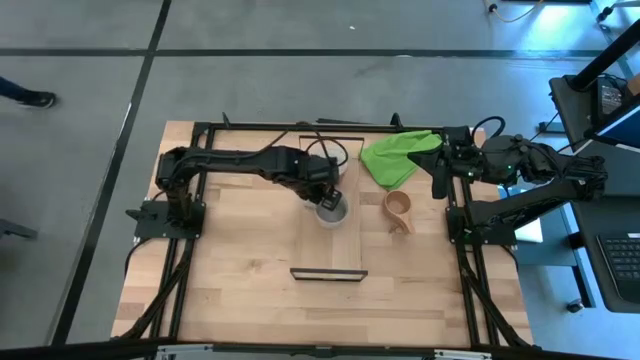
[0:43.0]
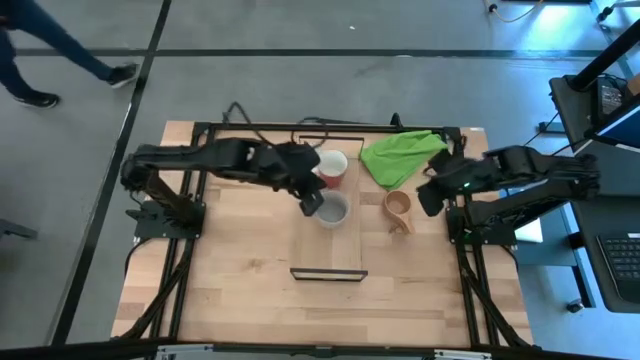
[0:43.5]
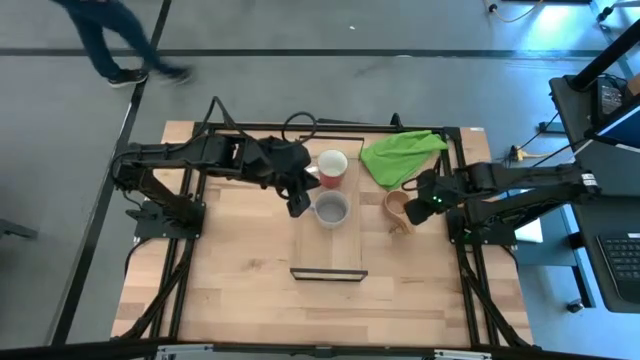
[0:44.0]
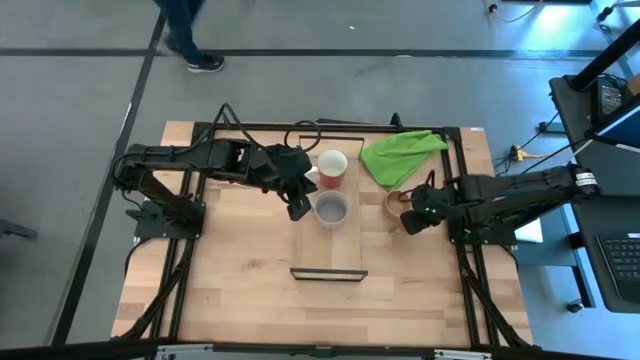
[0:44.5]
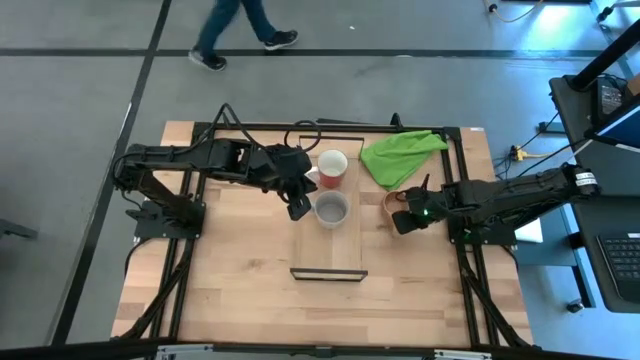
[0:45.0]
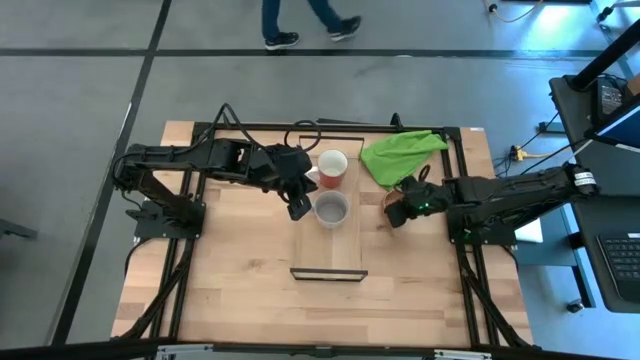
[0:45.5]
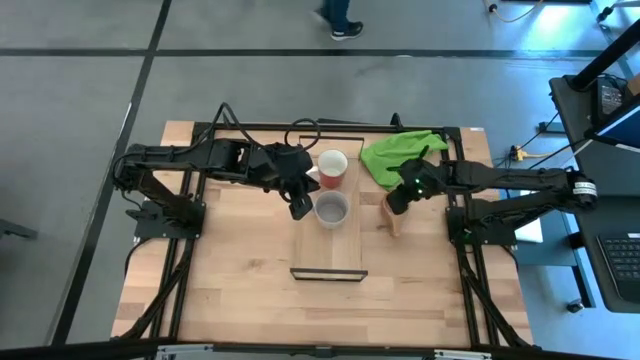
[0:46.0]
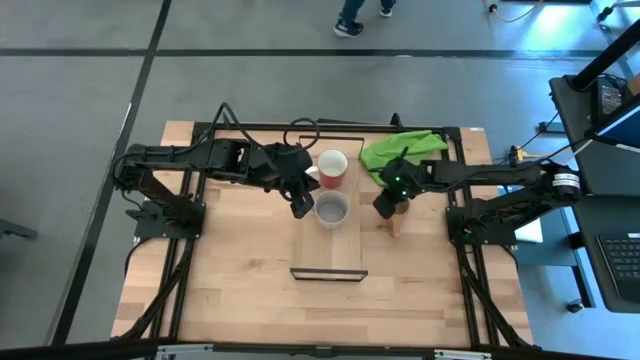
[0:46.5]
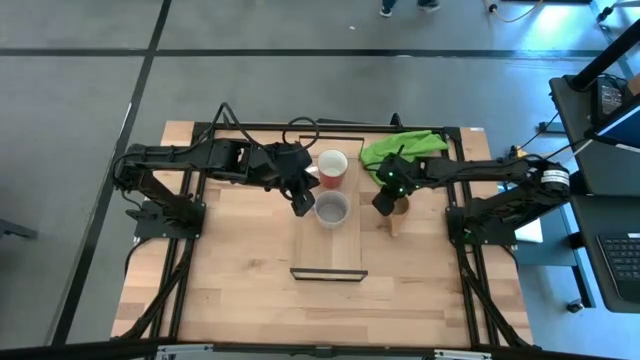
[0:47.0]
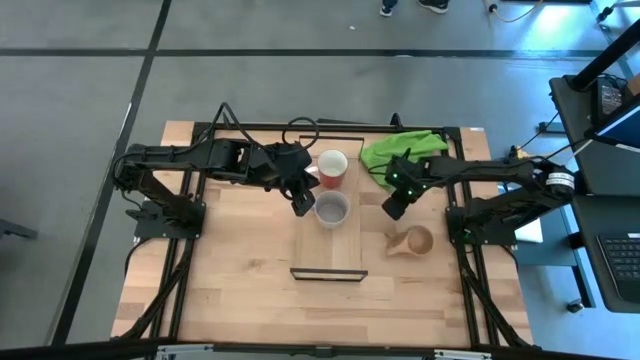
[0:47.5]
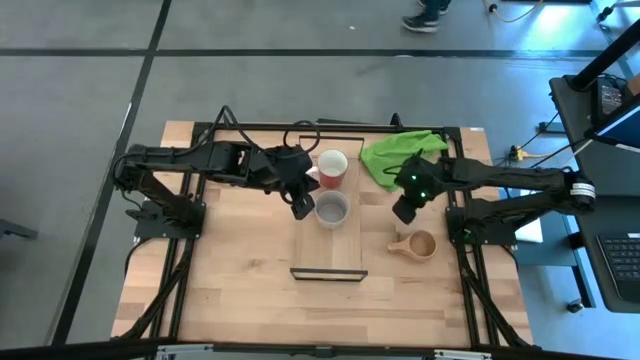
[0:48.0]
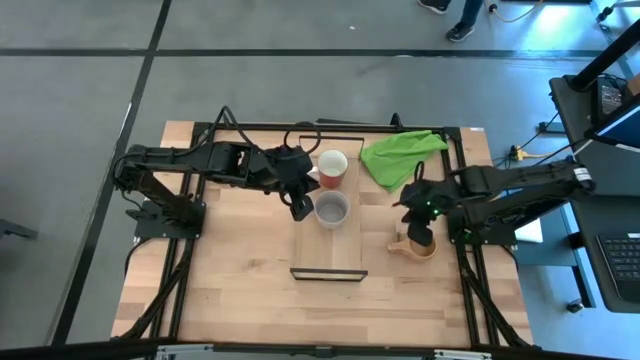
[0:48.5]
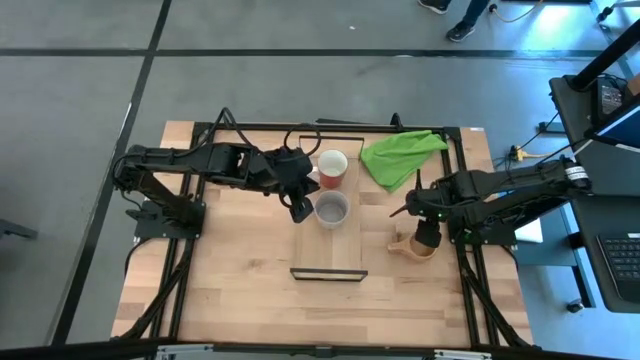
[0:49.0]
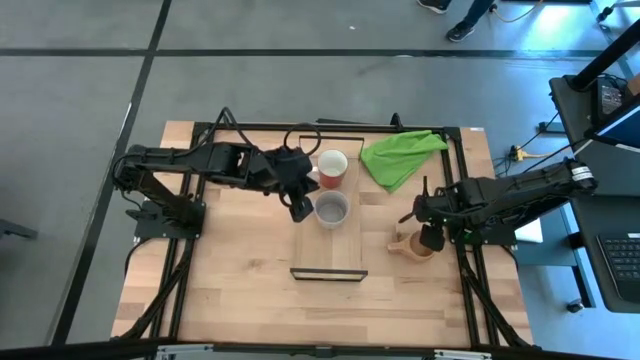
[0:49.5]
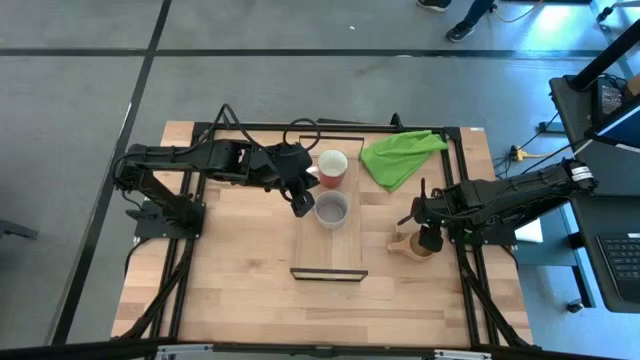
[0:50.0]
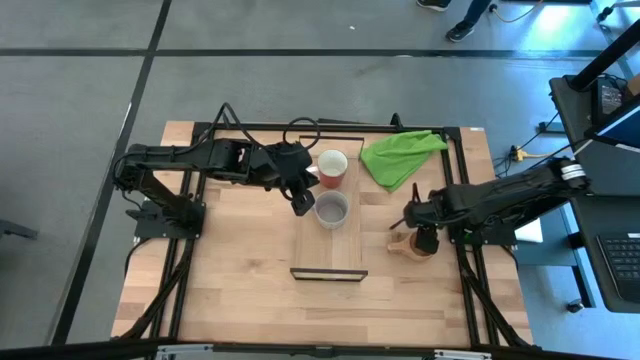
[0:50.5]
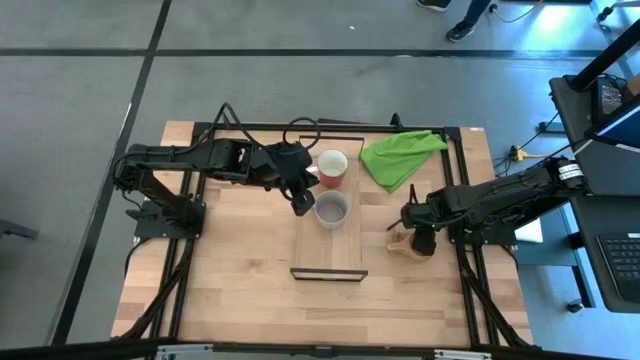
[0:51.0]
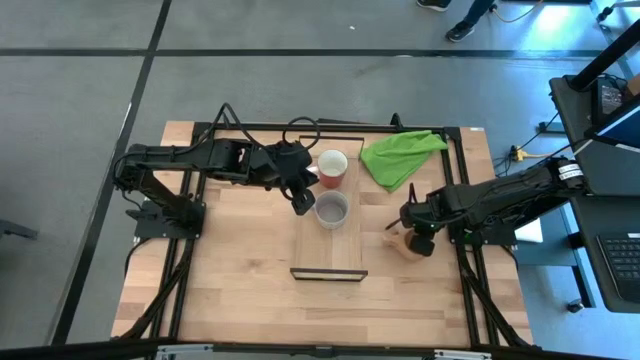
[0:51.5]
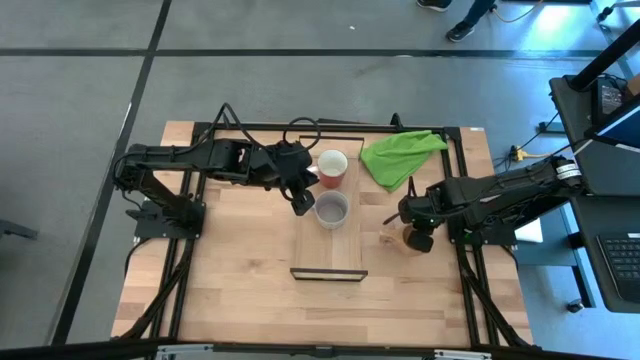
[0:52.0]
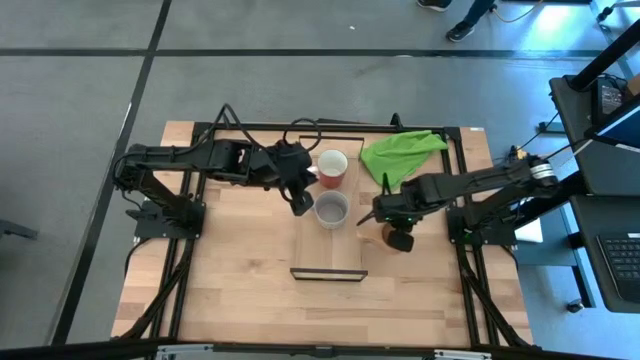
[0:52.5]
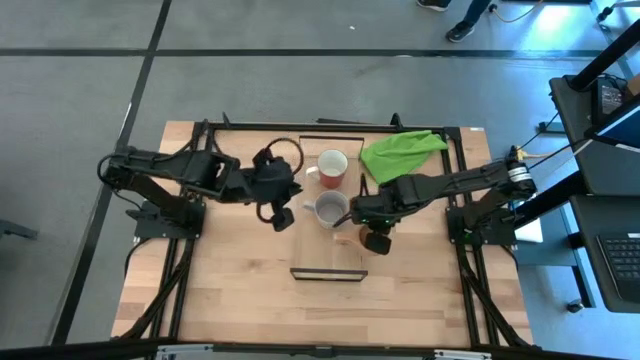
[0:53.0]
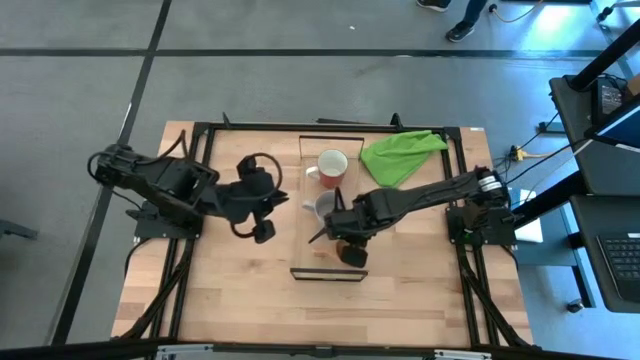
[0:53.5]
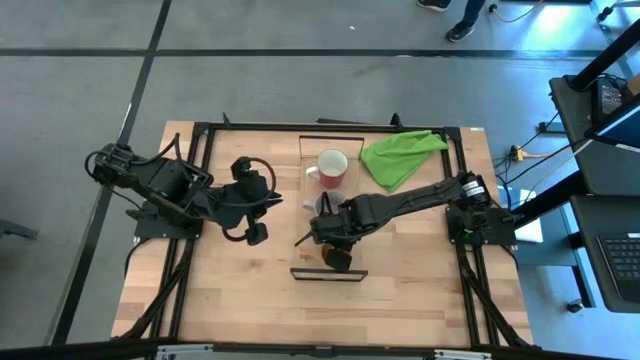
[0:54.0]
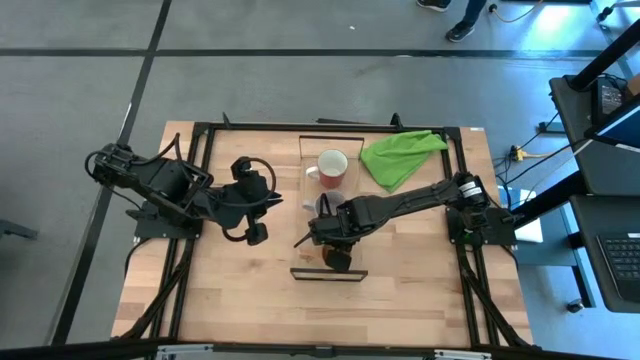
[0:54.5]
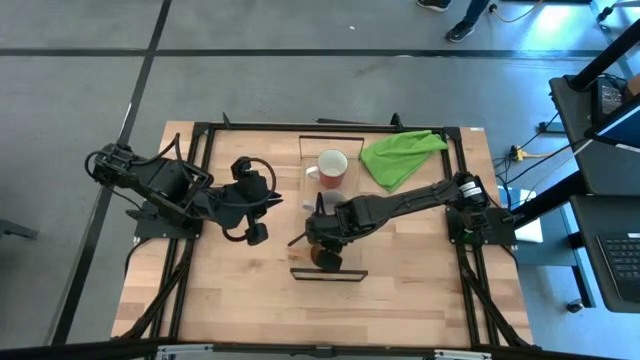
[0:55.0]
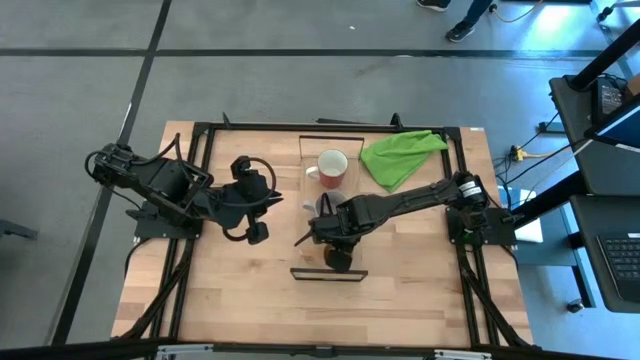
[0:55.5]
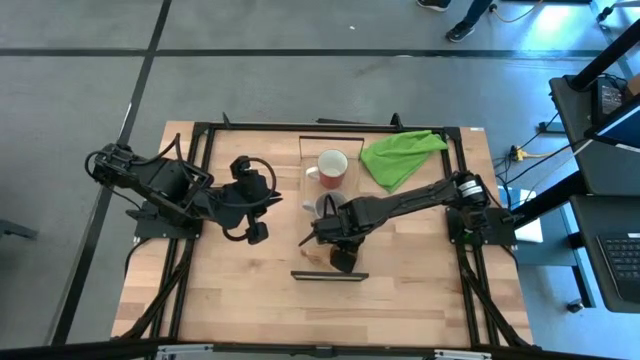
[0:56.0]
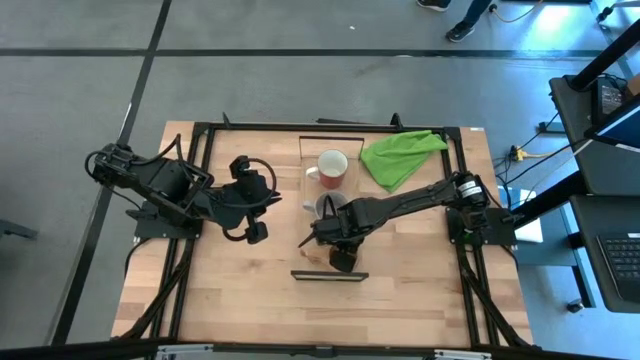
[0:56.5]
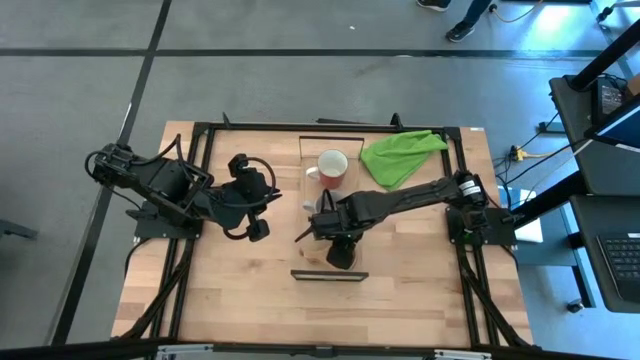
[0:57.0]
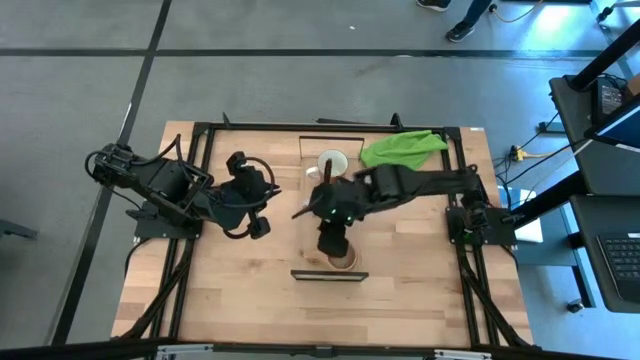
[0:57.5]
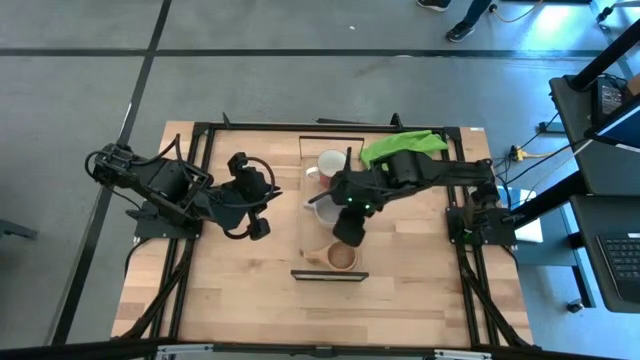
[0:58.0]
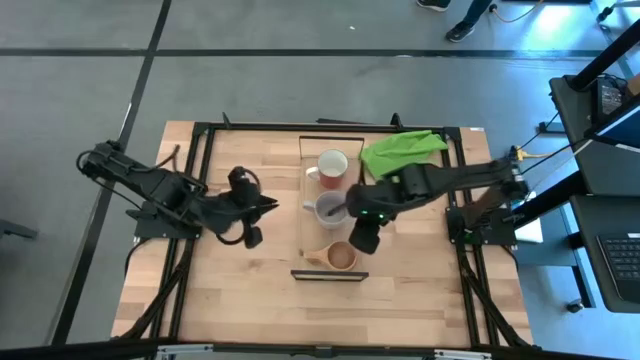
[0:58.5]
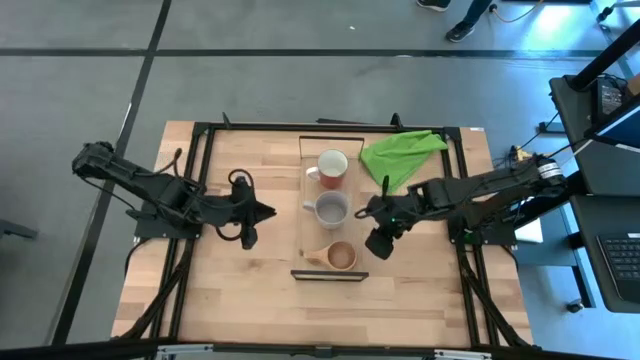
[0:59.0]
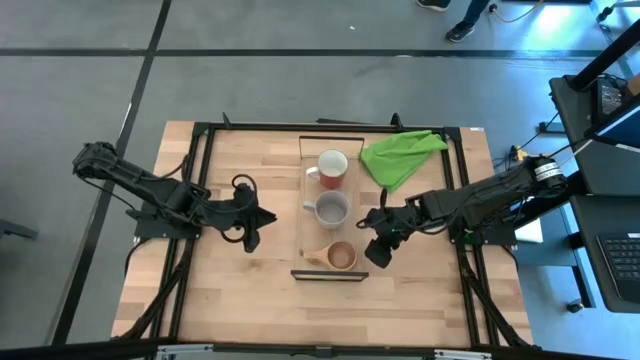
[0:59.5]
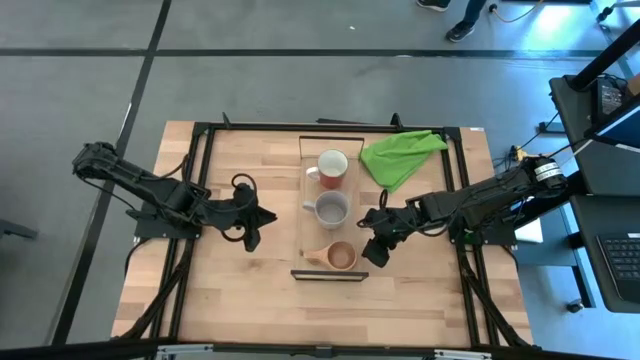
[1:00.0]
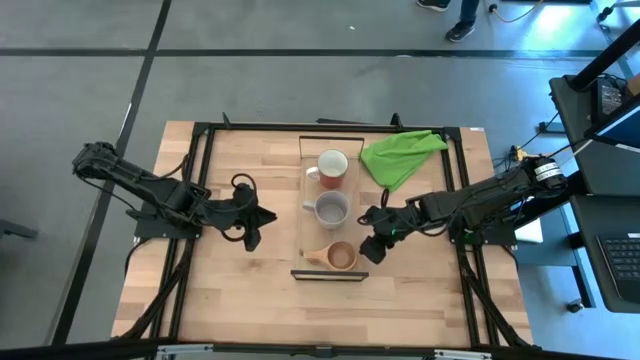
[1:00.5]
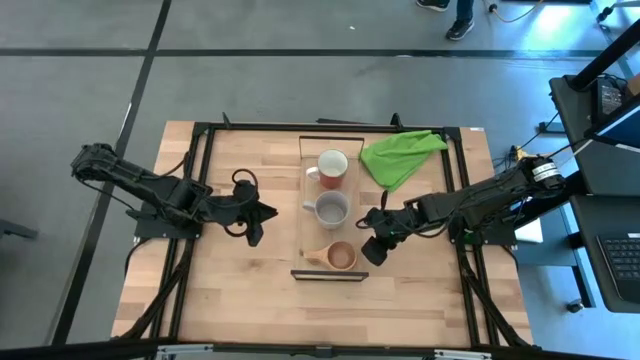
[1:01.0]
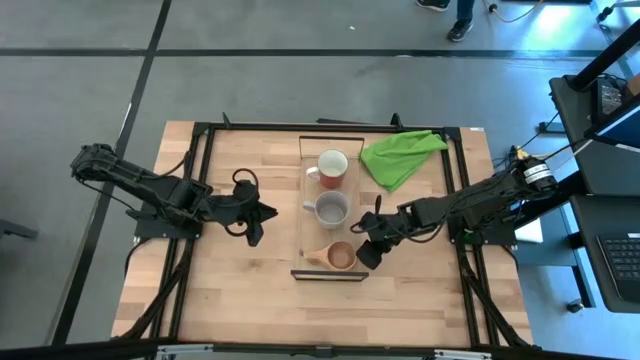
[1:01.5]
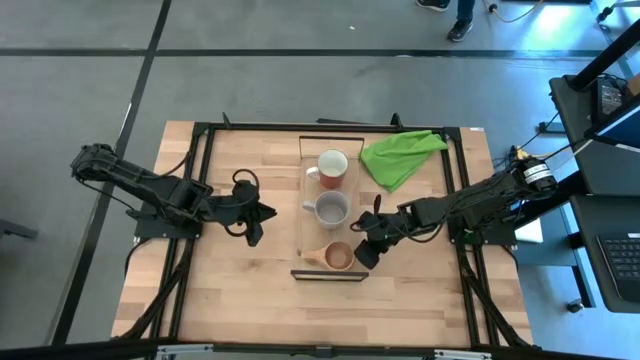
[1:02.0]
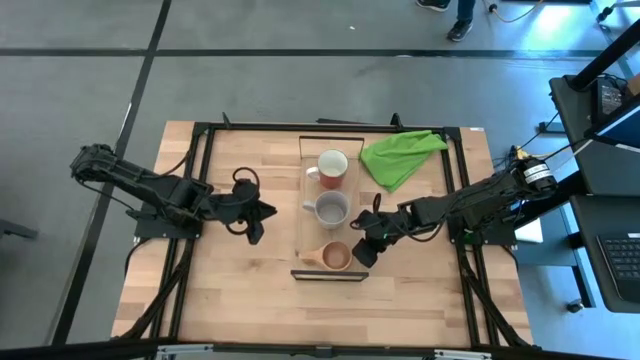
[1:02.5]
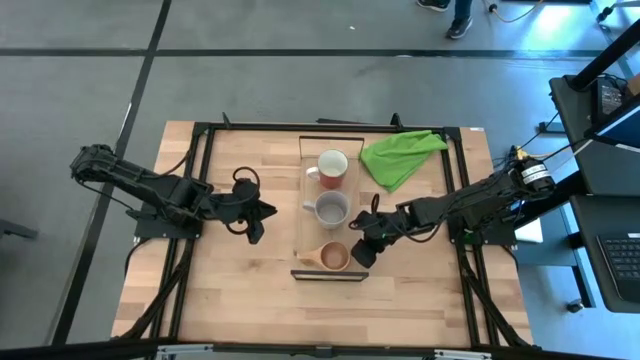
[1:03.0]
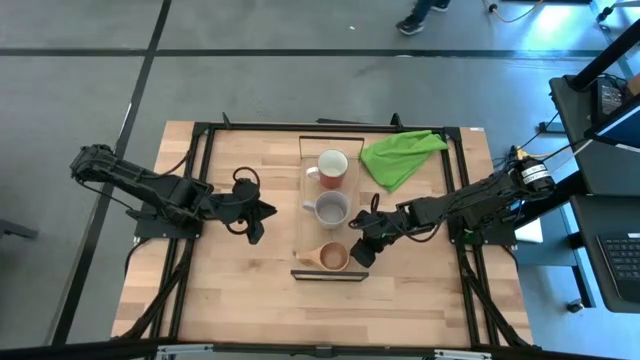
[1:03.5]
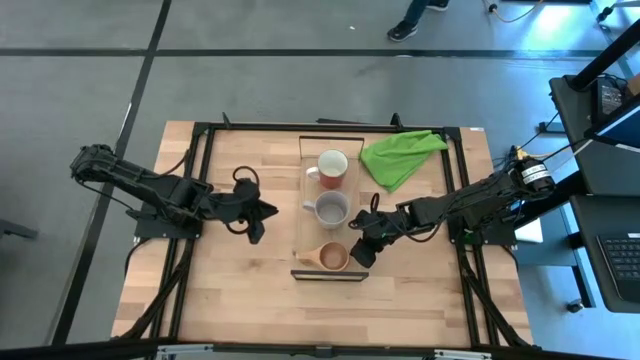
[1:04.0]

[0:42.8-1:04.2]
Task: Stack small to large cups/mugs on shelf
Put the brown mug on the shelf
